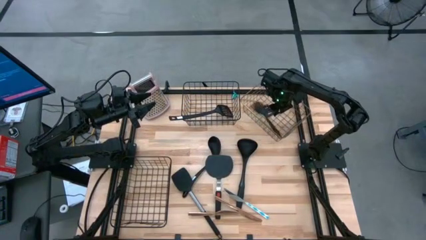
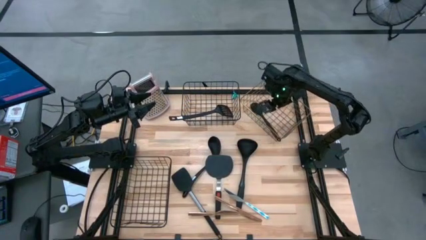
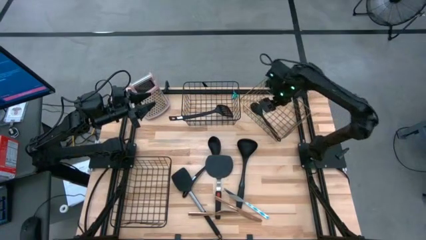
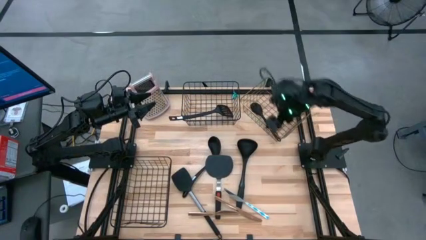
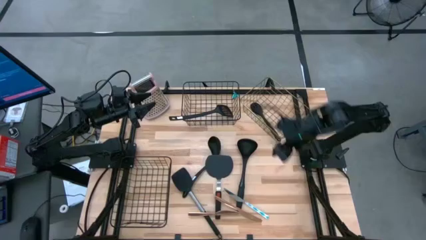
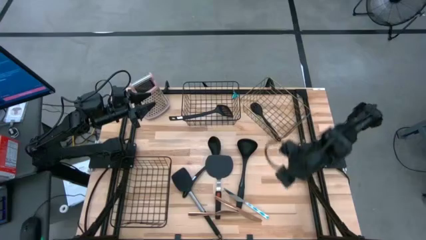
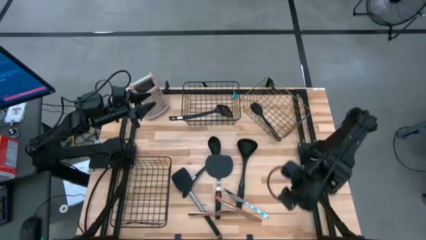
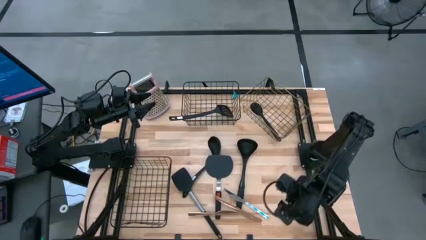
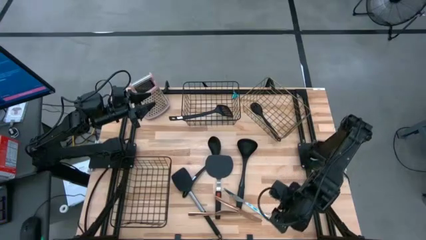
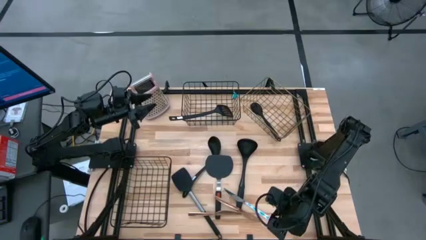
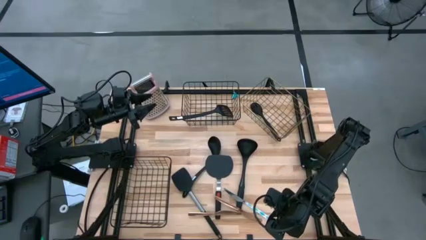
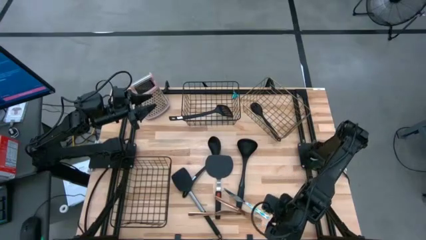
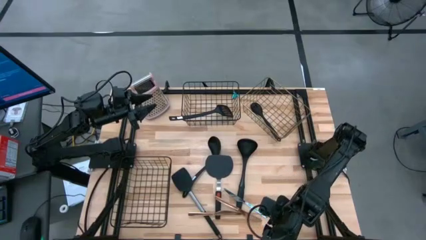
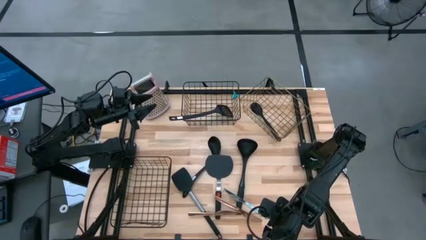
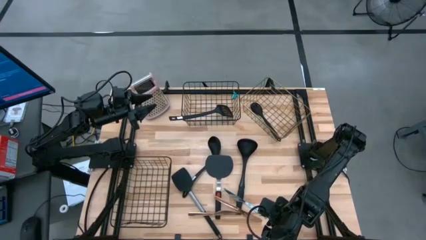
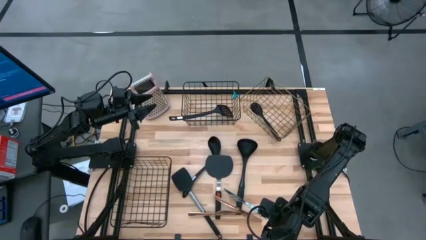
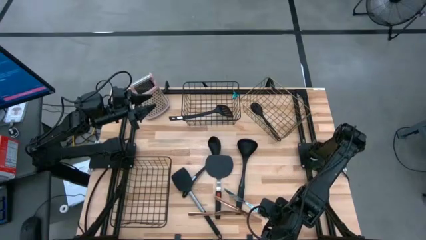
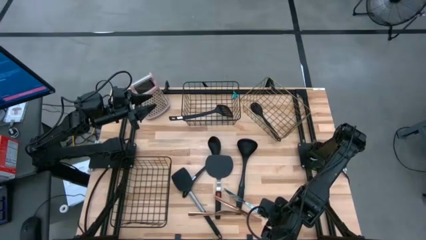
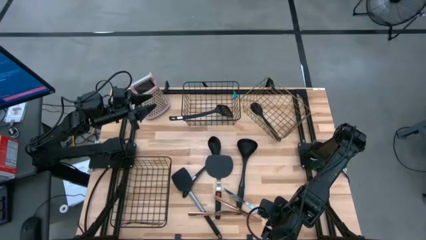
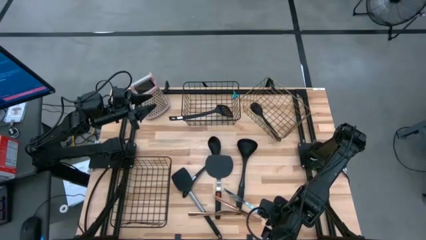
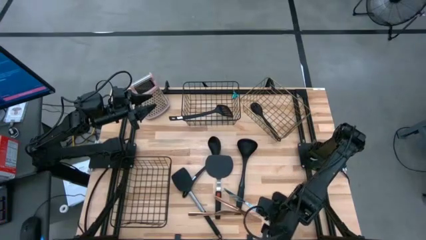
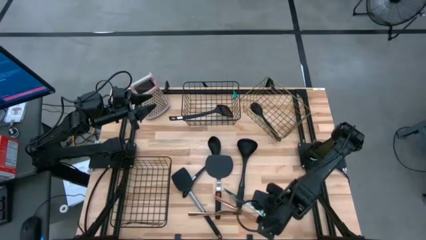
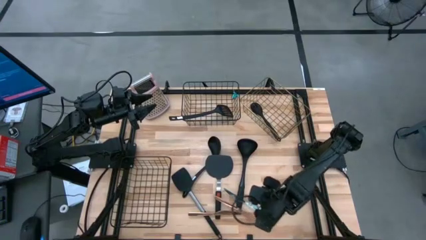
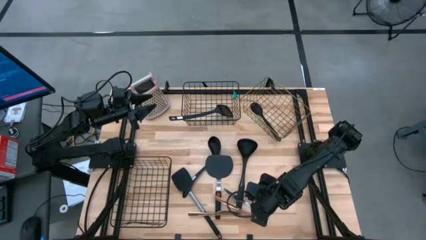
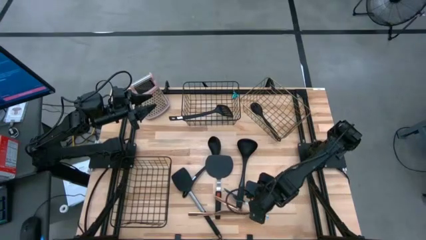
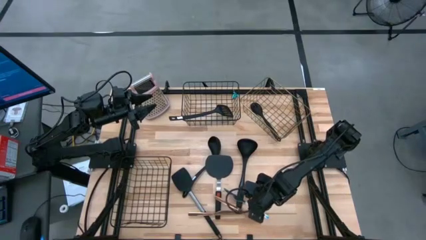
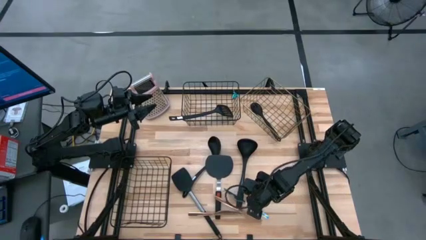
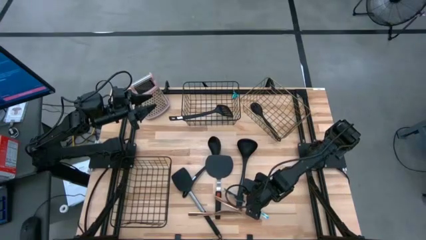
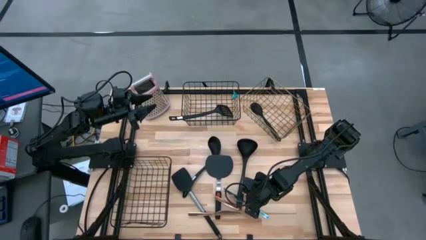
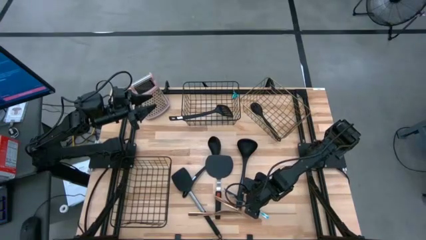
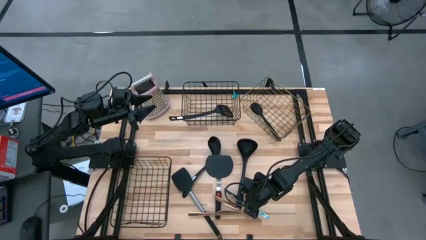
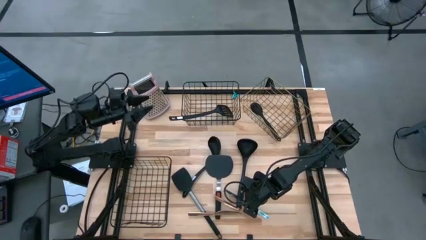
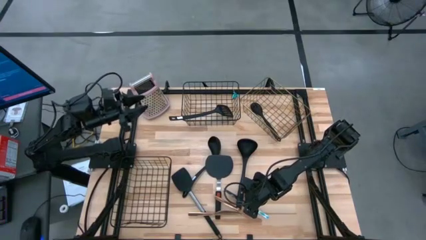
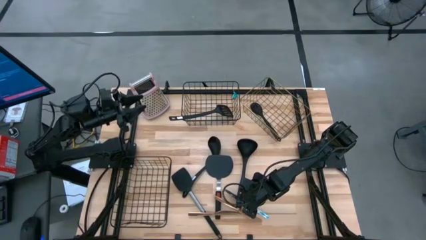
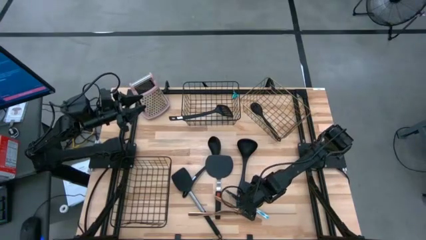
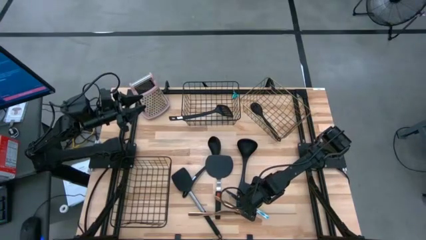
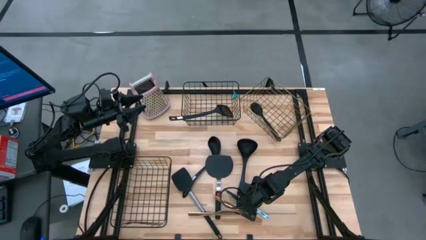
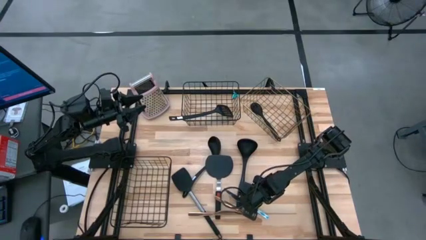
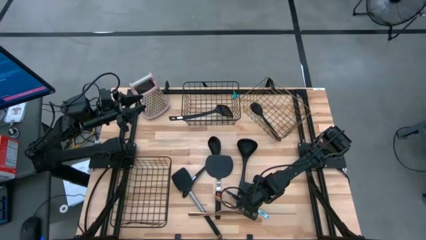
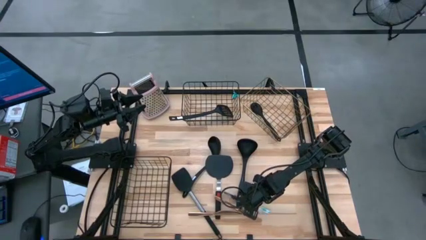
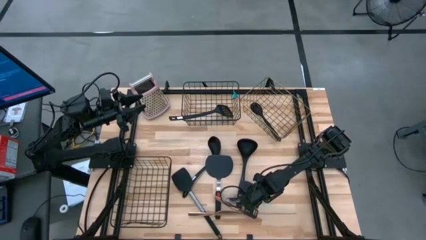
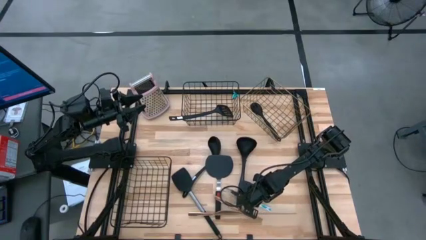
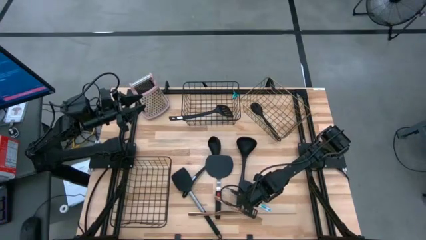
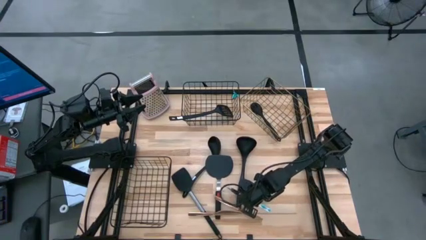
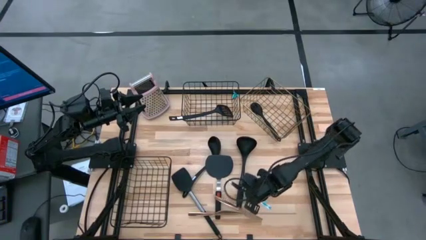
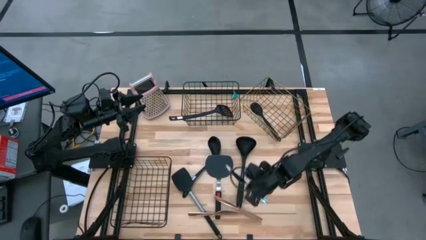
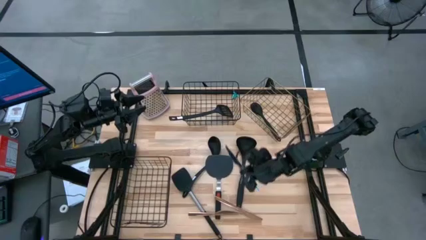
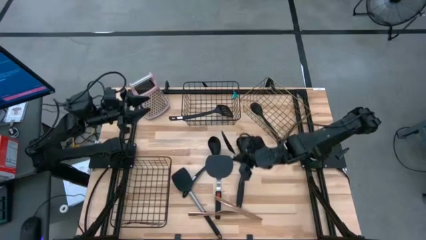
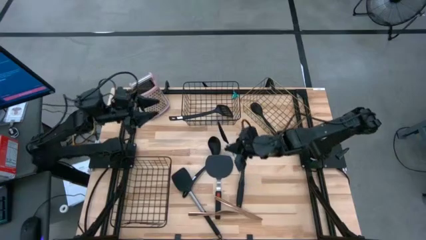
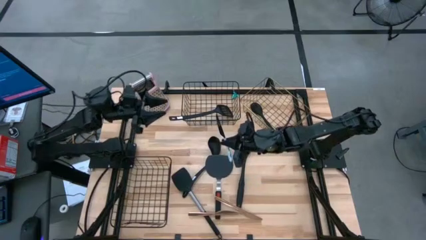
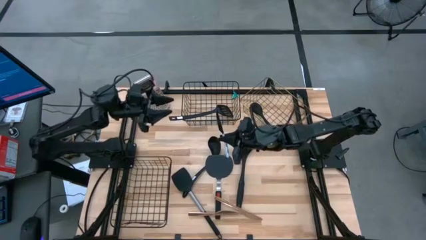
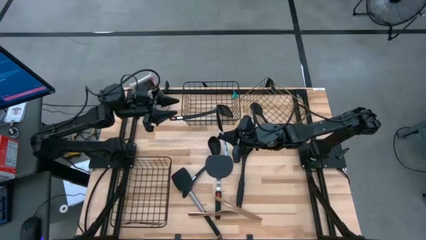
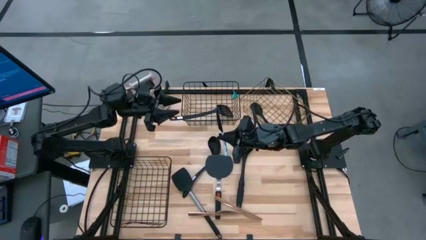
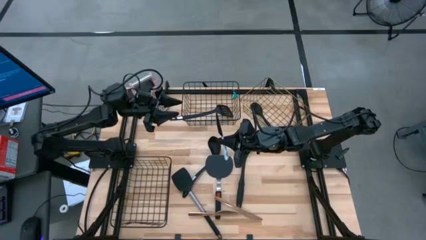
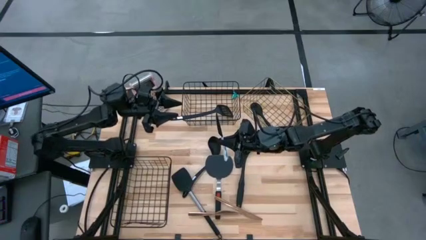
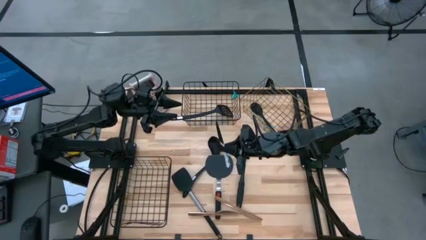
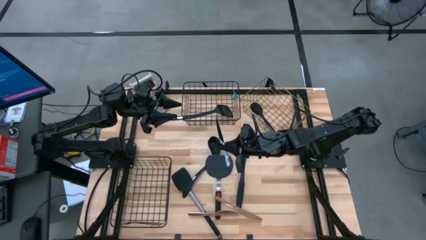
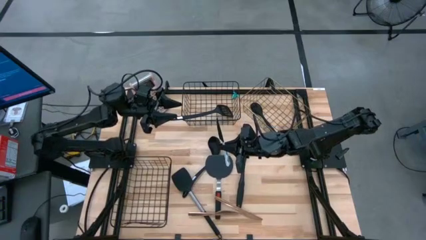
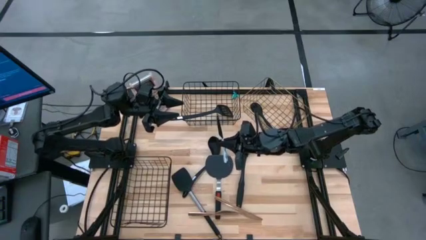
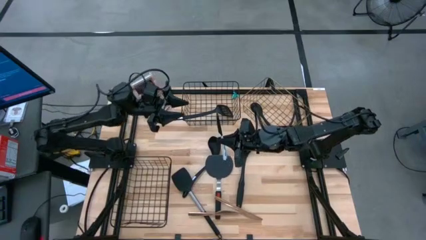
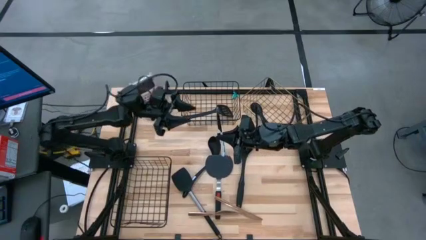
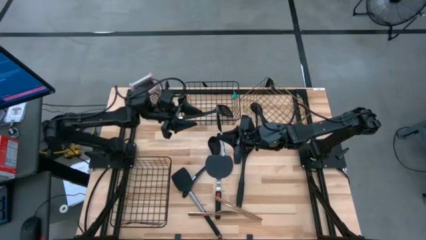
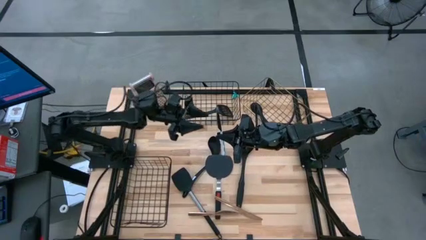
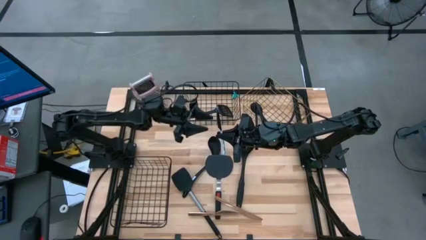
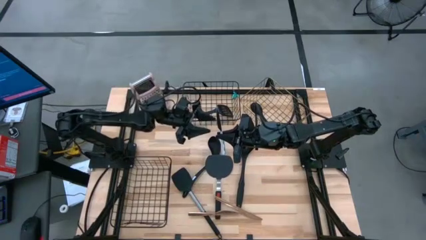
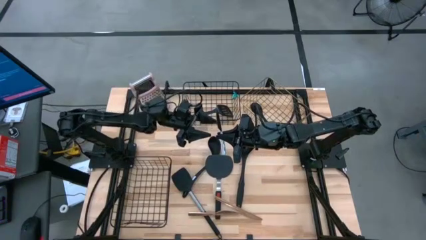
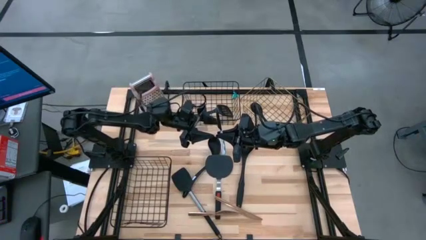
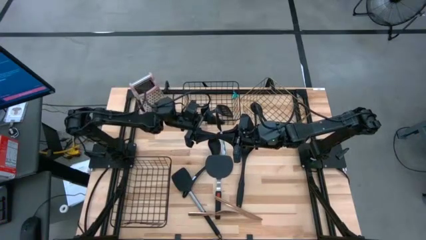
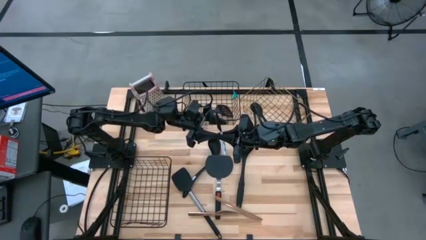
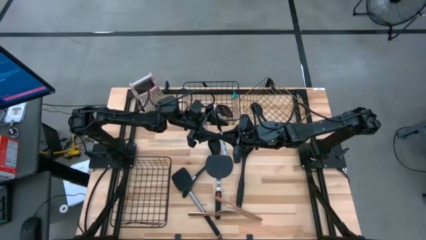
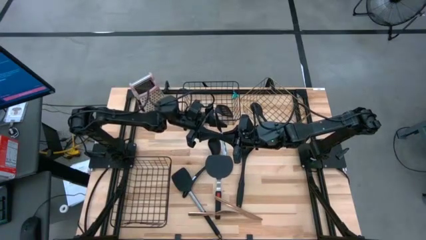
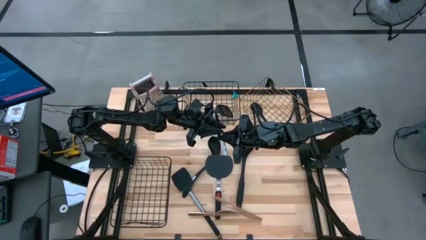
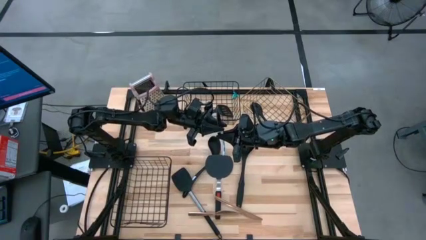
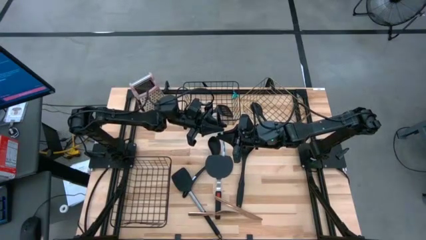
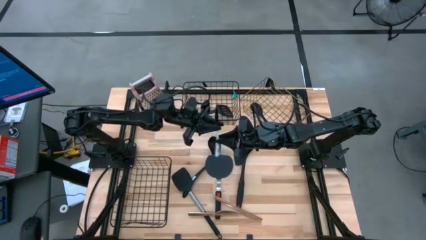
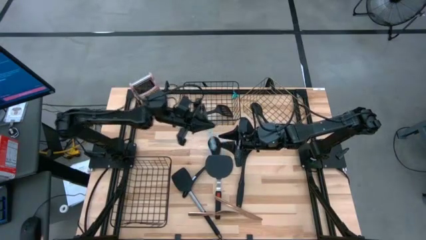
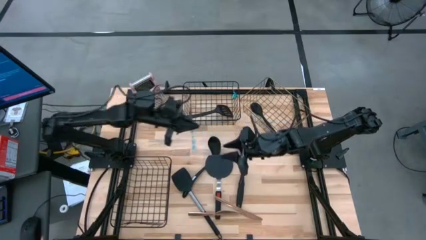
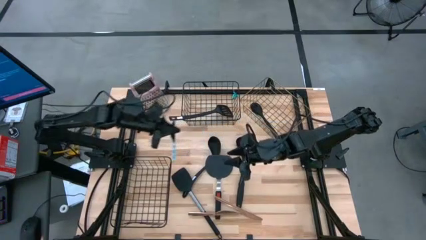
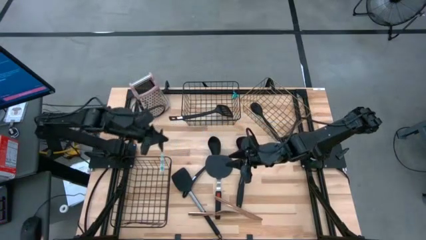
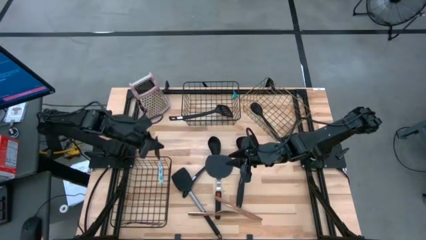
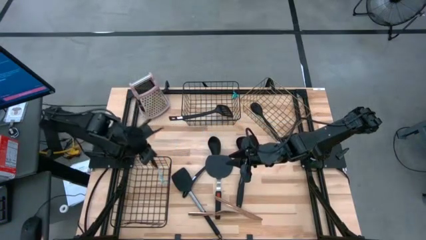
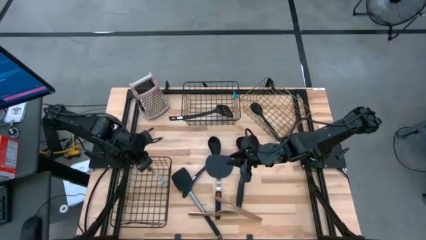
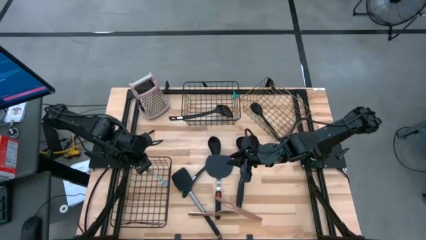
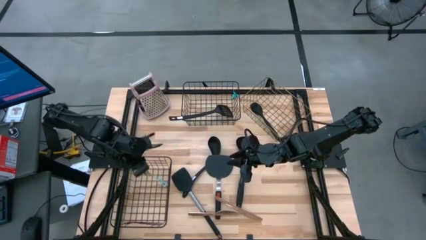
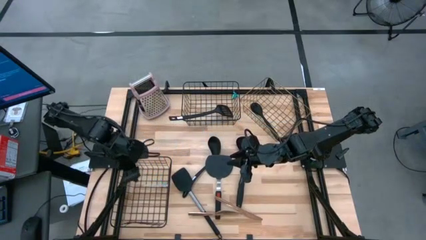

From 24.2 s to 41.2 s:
Task: Pick & Place Kitchen Items
Put the blue table knife into the bottom wire basket
